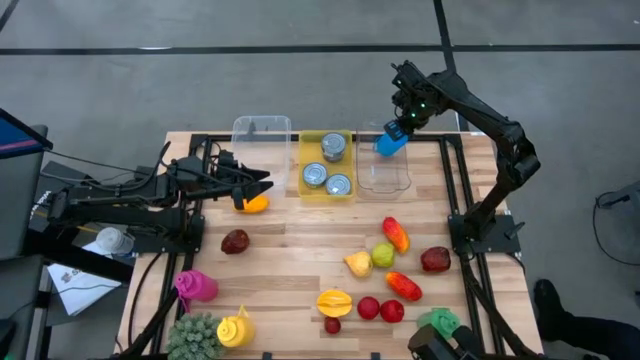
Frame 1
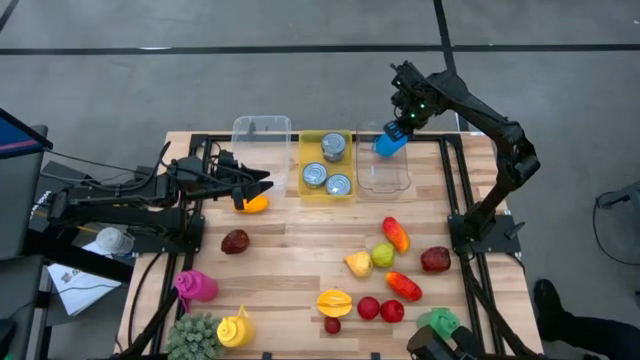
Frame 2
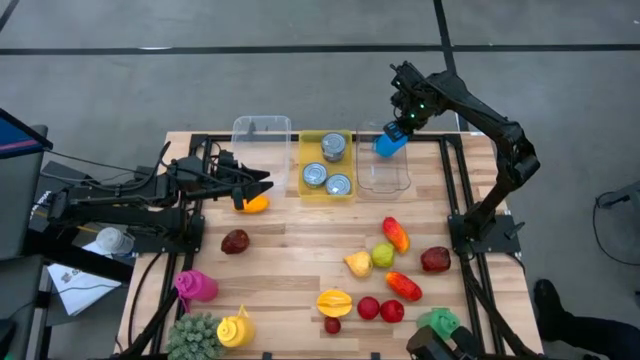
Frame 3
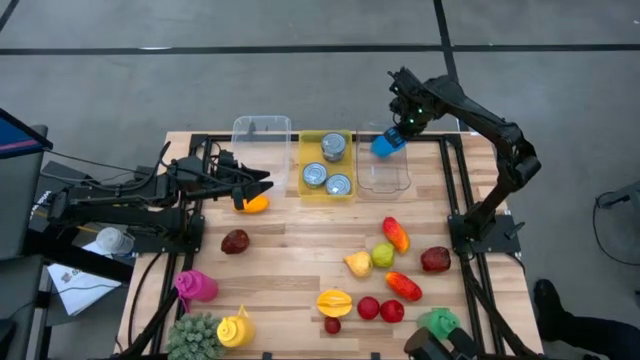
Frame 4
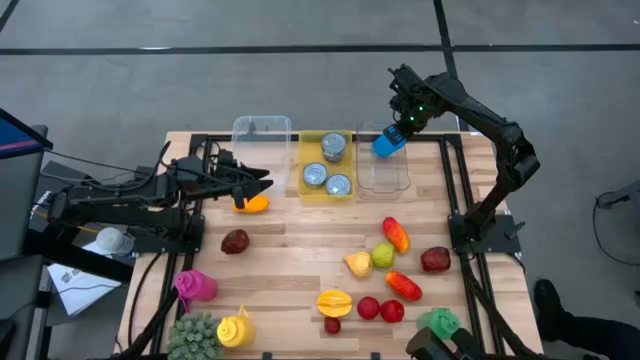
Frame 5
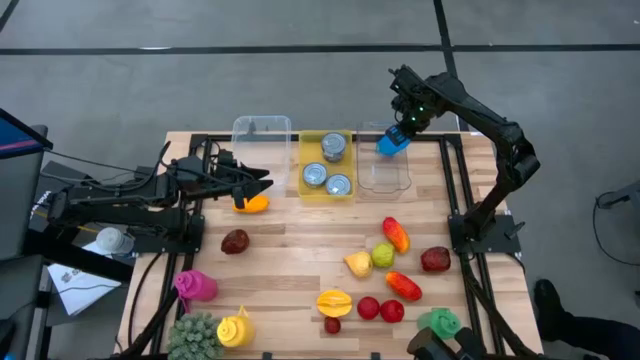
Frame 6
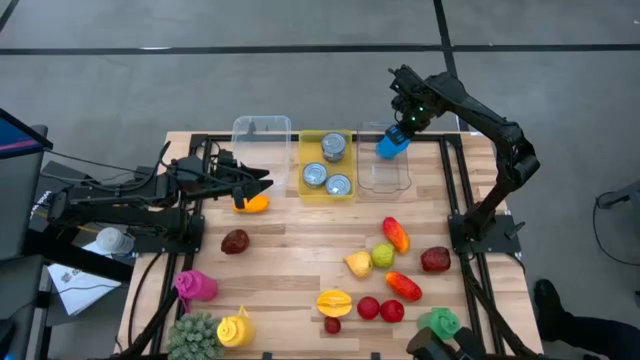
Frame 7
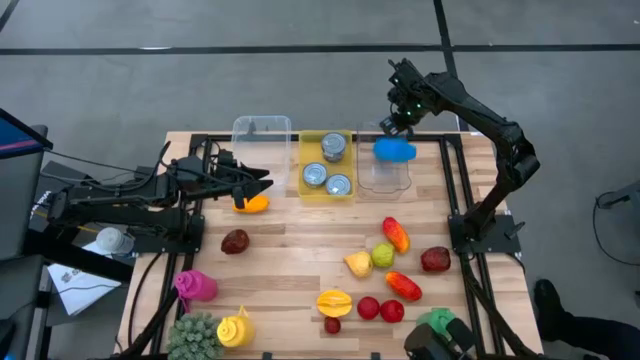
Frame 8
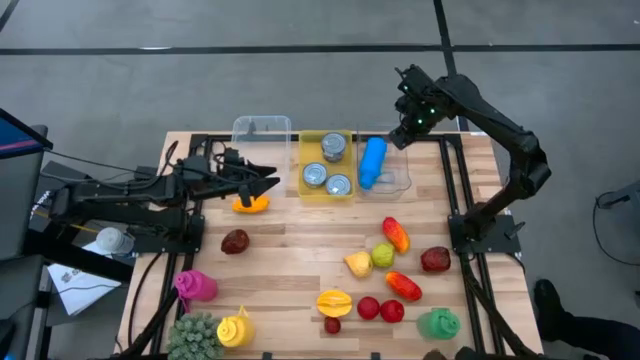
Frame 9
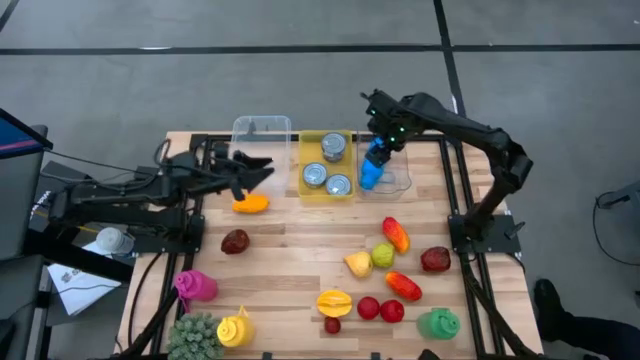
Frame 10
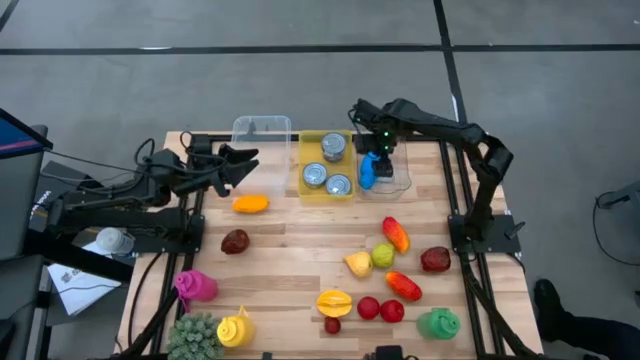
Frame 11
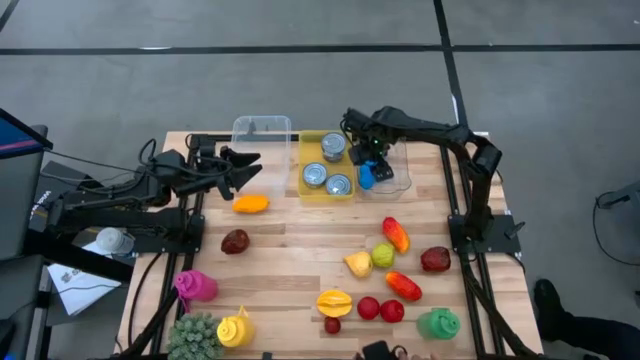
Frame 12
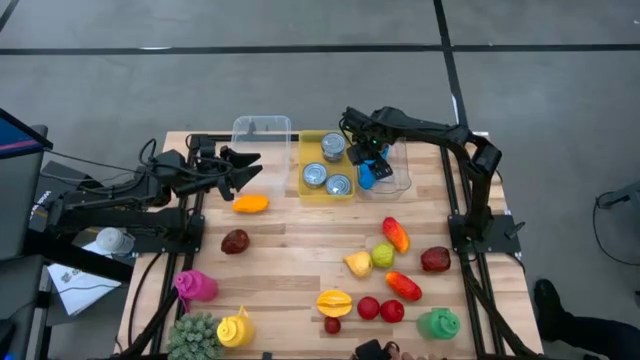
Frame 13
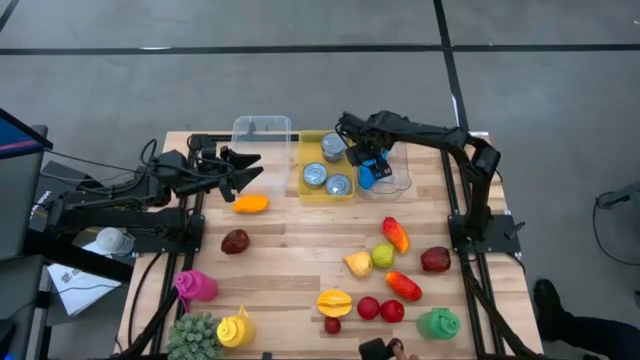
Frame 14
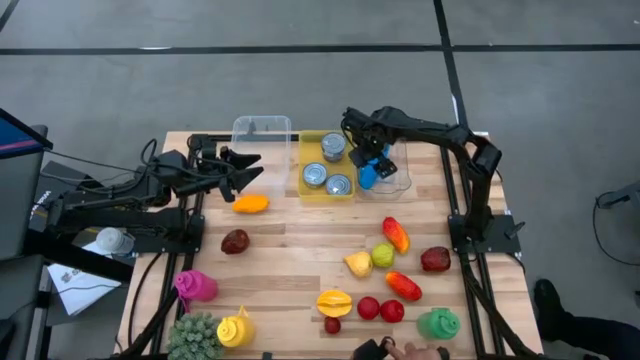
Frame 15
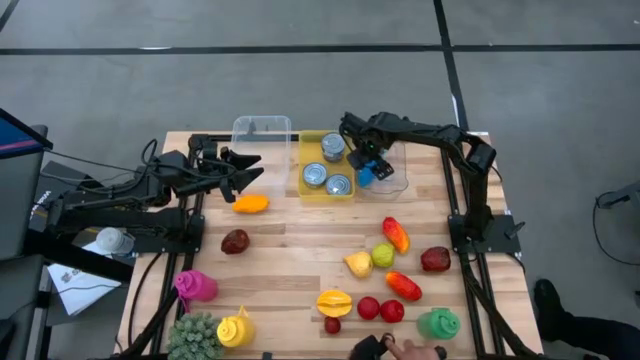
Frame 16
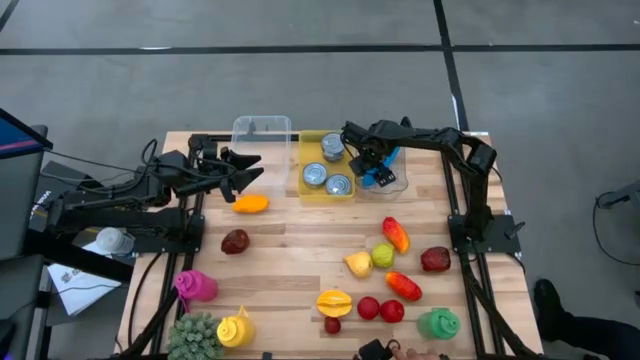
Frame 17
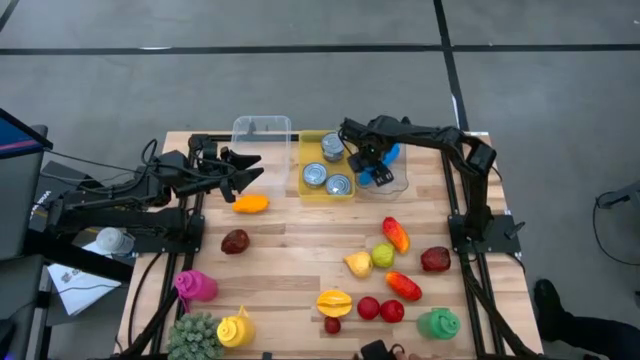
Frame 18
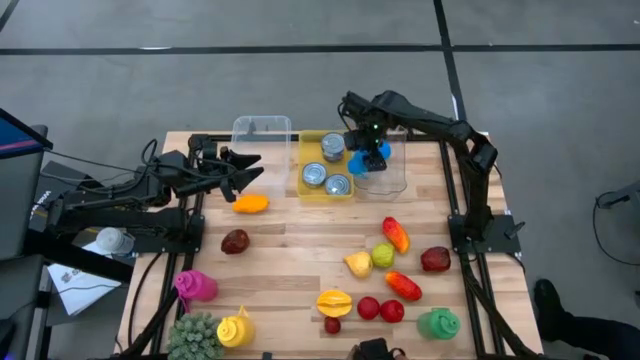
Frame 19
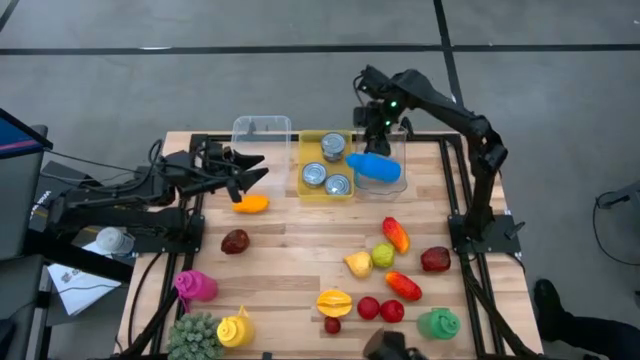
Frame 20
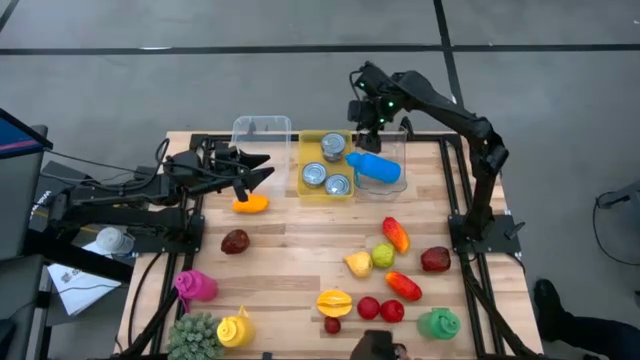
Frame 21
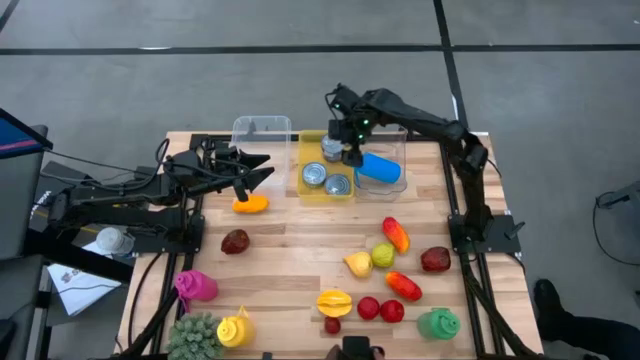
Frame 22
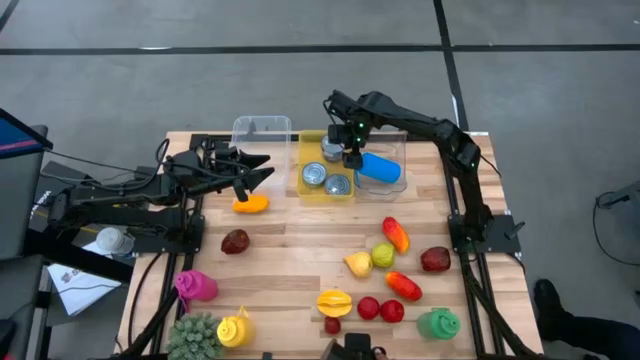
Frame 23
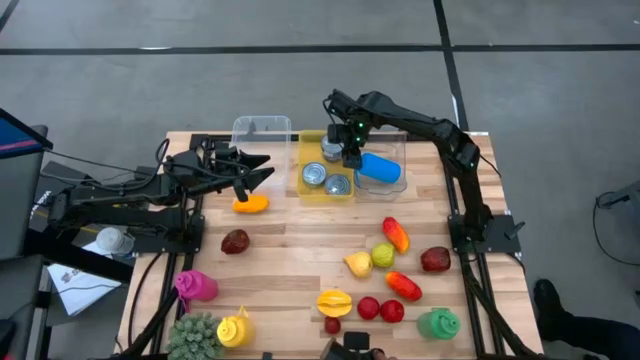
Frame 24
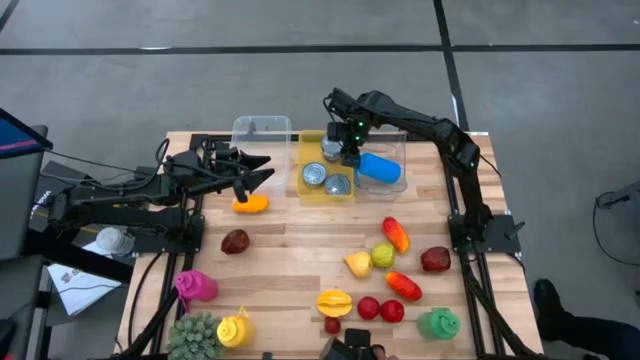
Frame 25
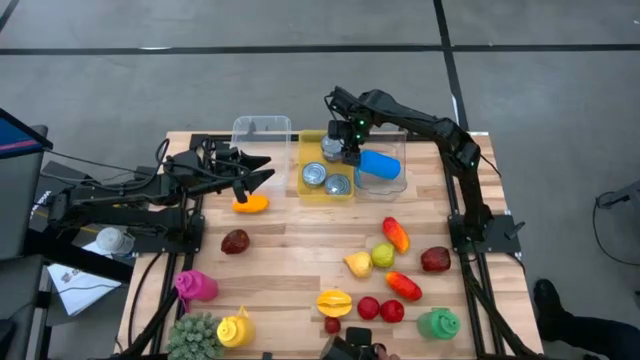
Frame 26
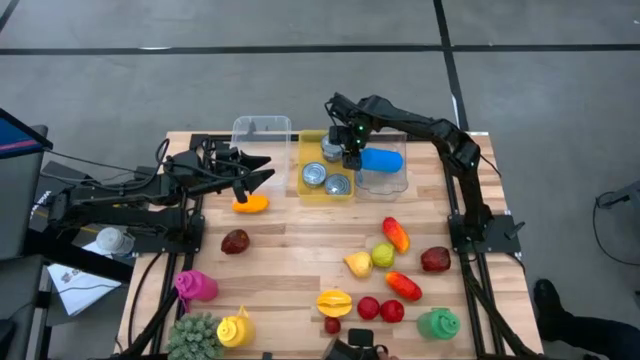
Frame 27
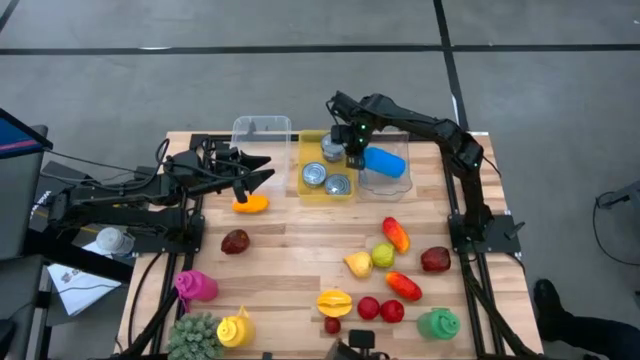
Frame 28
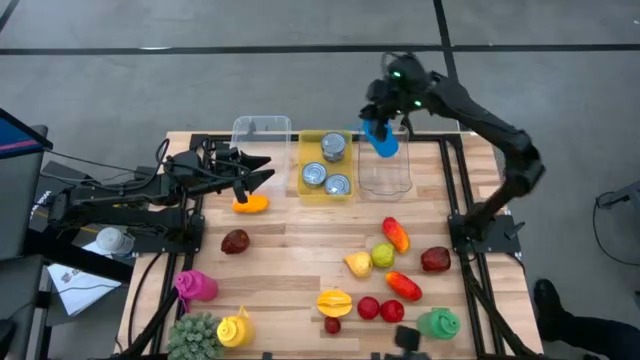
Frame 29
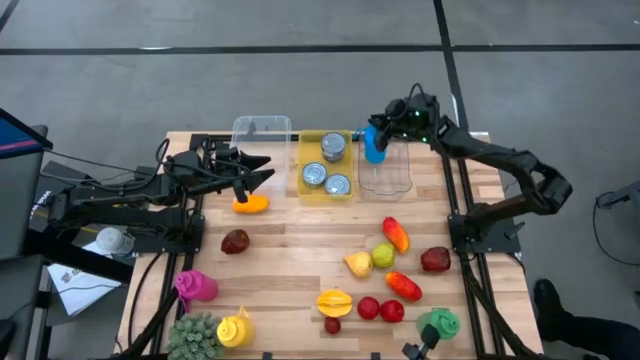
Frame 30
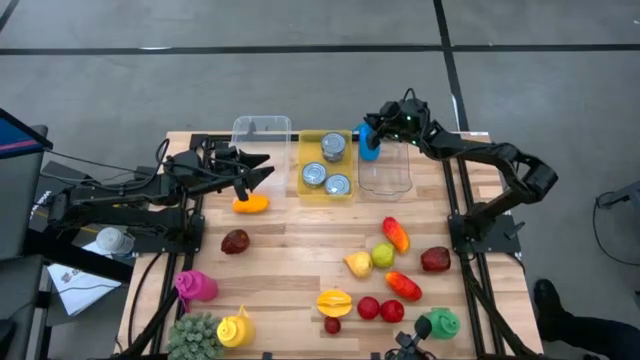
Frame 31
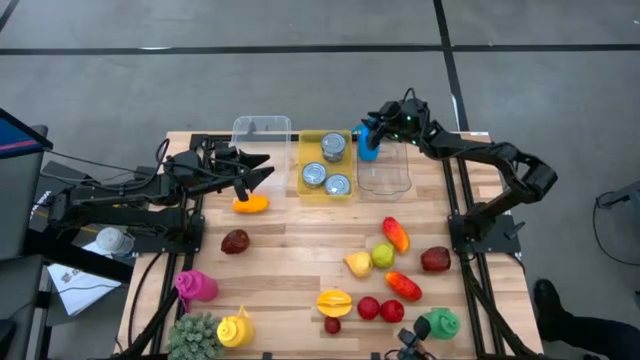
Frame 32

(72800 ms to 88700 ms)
Task: Pick & Place Food Item
Put the blue tumbler into the transparent bin

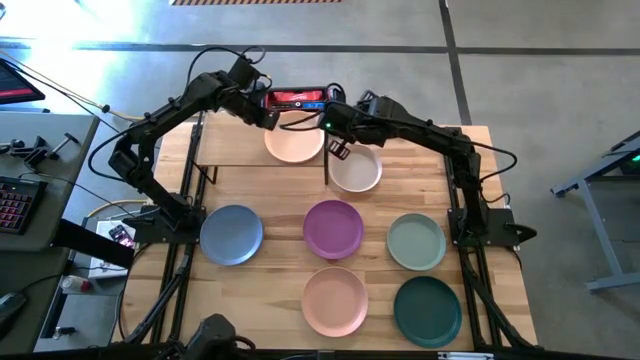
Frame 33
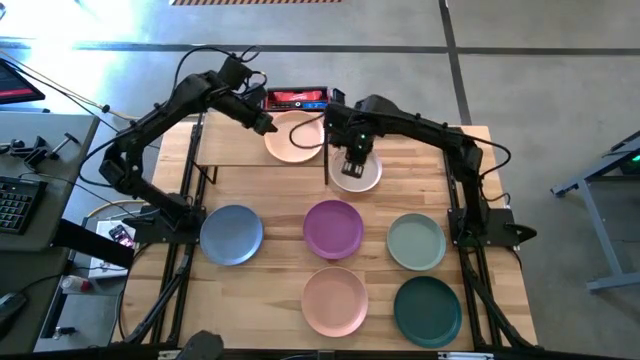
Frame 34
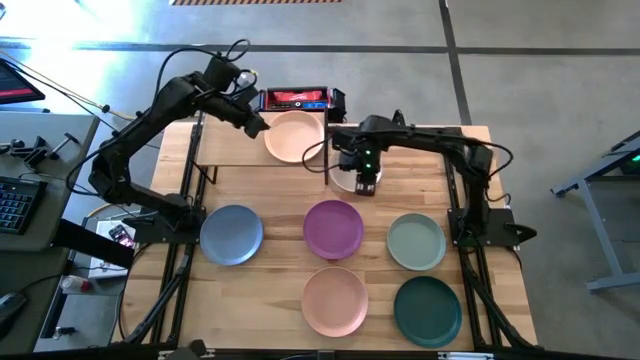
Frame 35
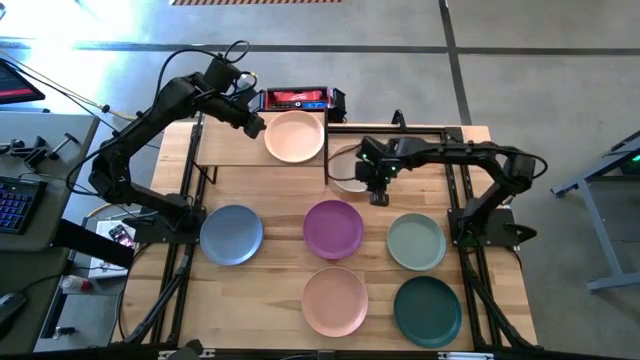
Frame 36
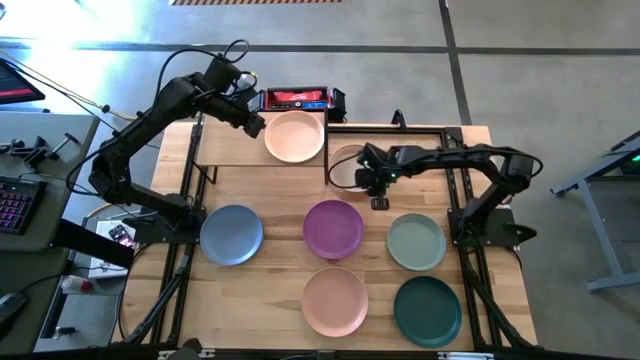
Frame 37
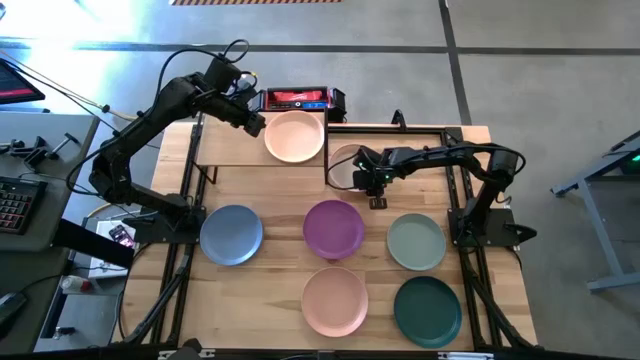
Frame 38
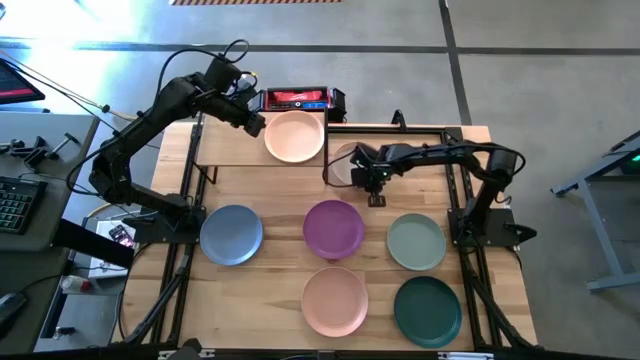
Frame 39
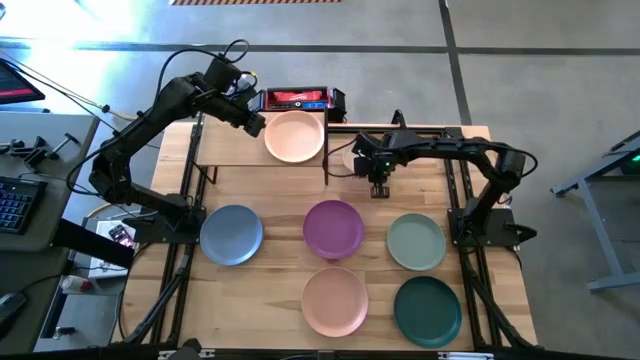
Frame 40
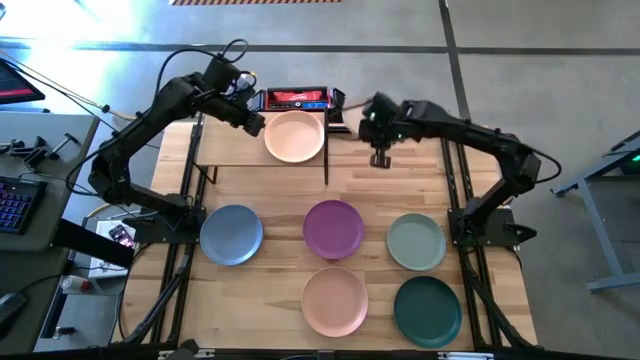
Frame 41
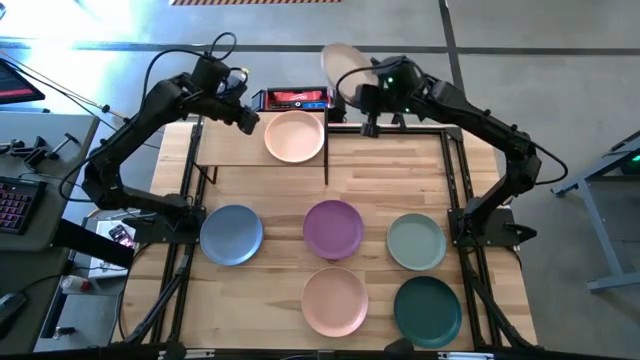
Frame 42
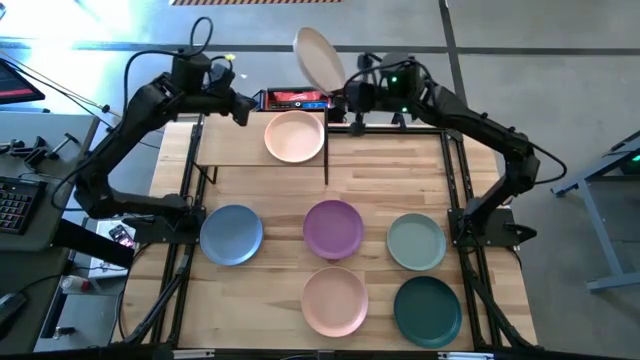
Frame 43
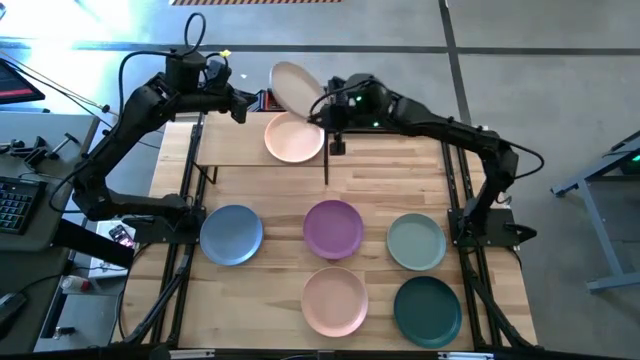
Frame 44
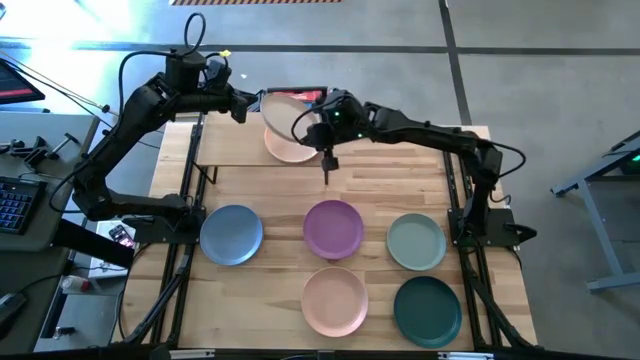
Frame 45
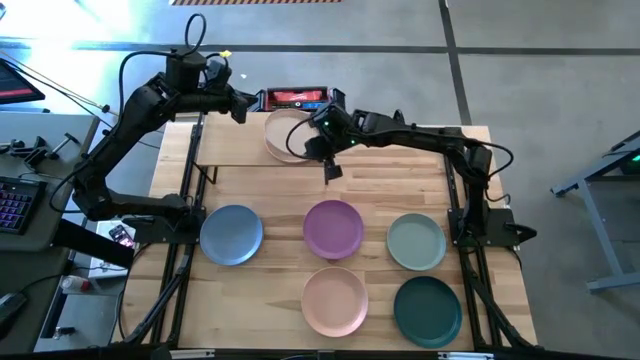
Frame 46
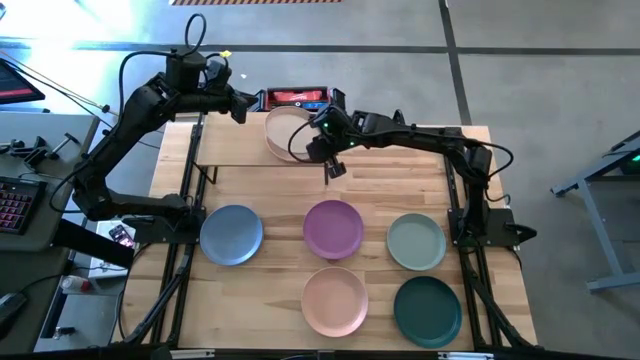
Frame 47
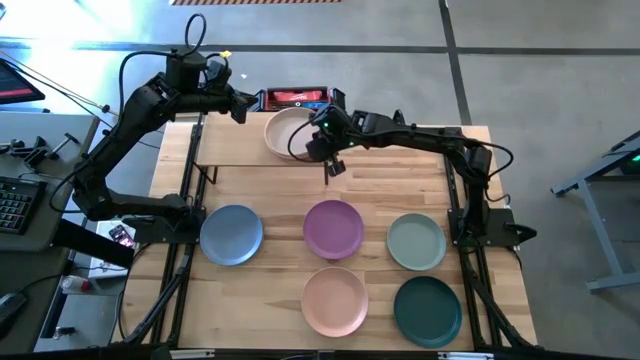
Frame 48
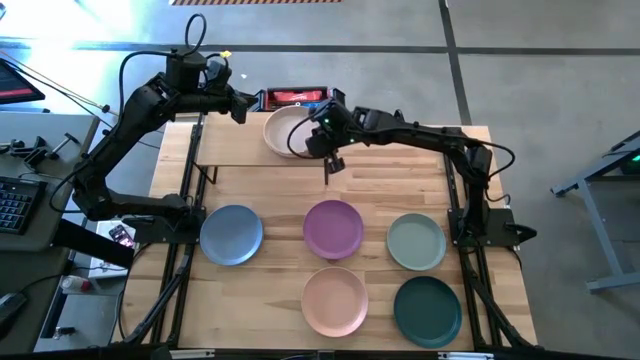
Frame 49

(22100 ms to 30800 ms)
Task: Place and stack plates onto a shelf
Stack the white plate on top of the light orange plate on the shelf
